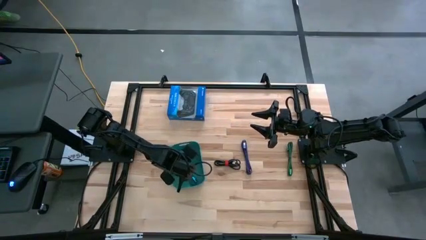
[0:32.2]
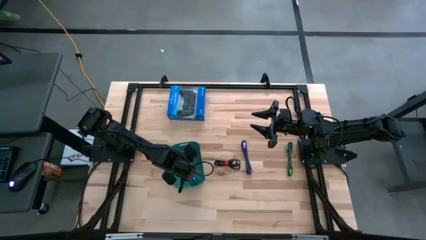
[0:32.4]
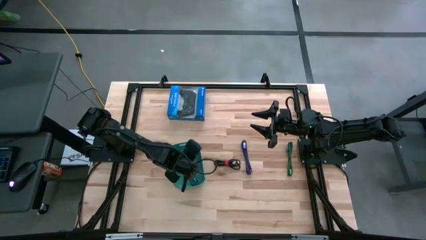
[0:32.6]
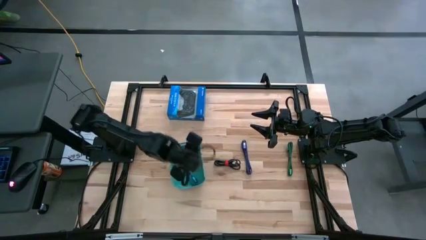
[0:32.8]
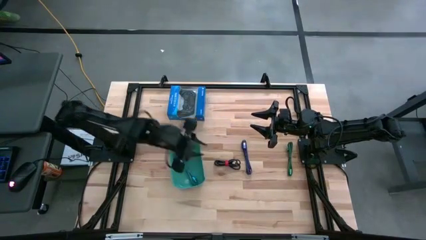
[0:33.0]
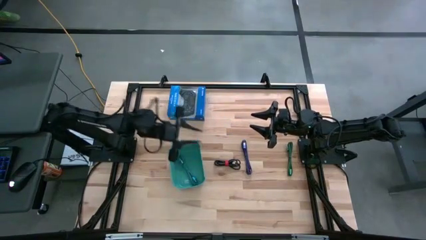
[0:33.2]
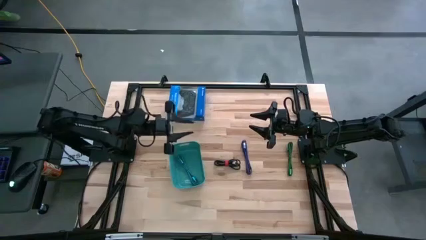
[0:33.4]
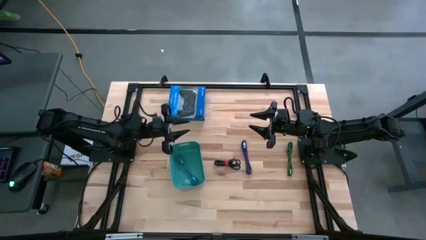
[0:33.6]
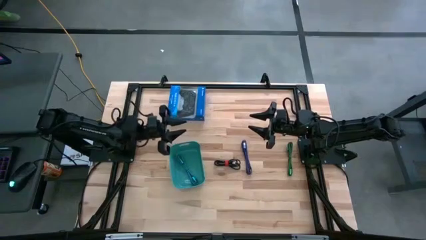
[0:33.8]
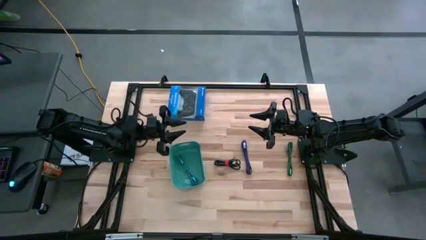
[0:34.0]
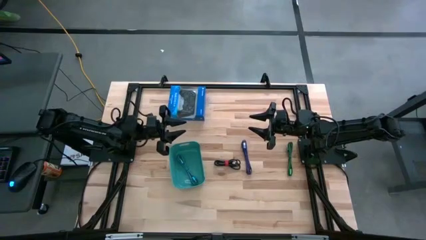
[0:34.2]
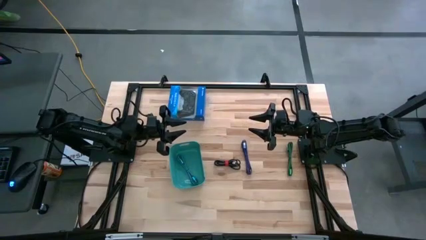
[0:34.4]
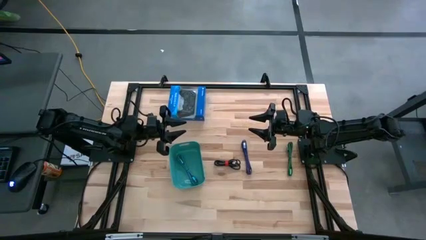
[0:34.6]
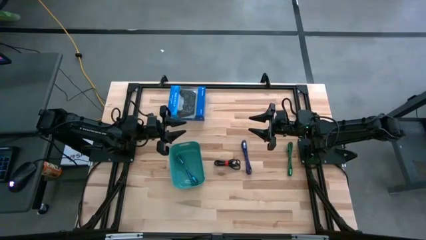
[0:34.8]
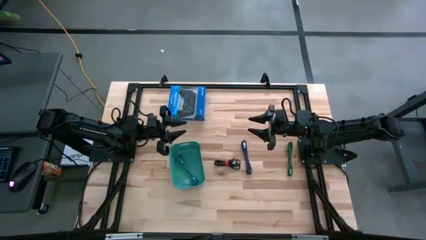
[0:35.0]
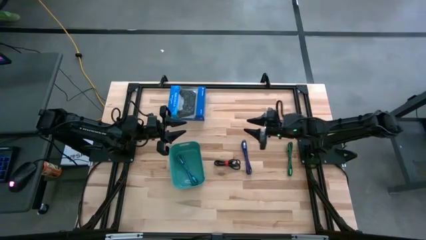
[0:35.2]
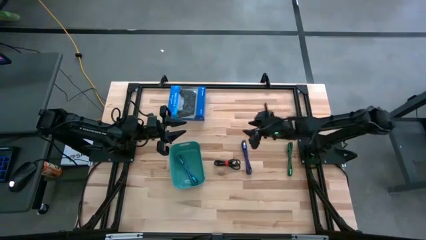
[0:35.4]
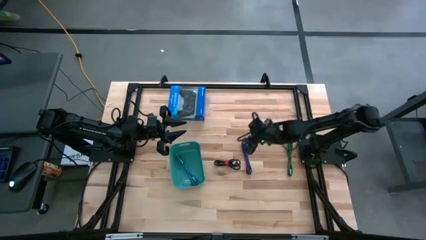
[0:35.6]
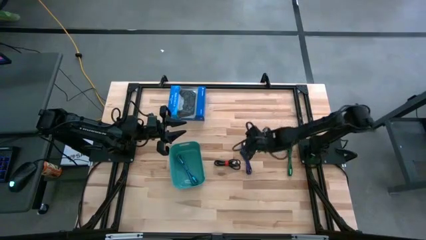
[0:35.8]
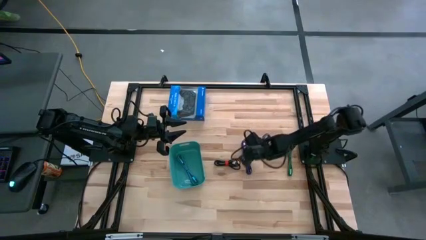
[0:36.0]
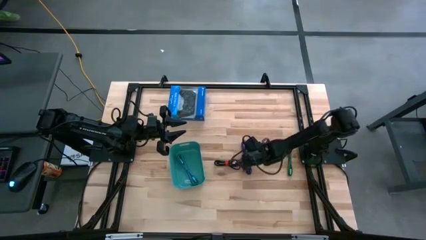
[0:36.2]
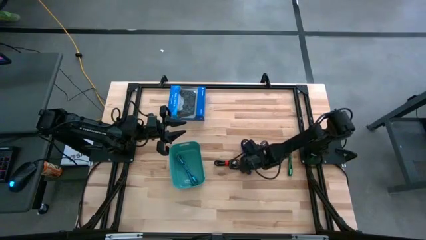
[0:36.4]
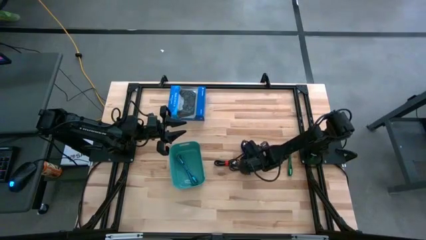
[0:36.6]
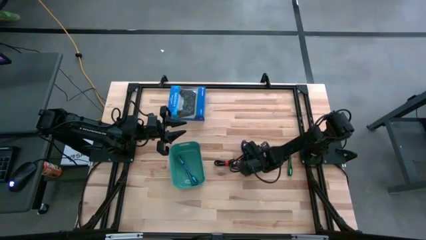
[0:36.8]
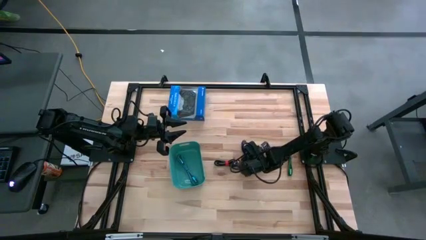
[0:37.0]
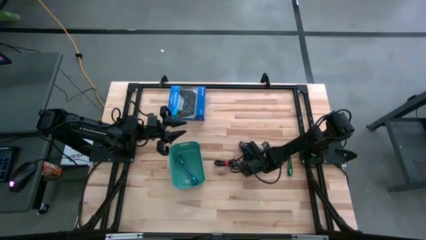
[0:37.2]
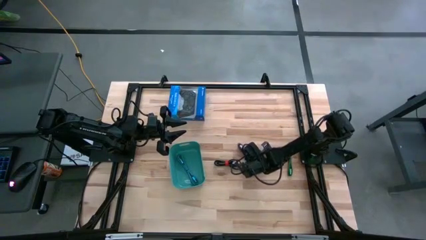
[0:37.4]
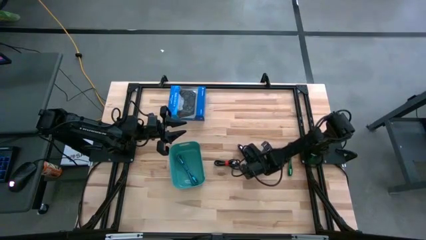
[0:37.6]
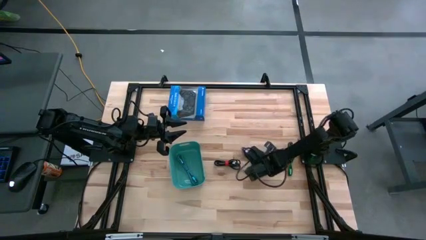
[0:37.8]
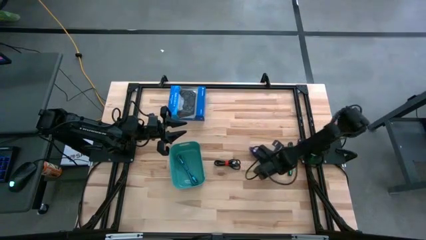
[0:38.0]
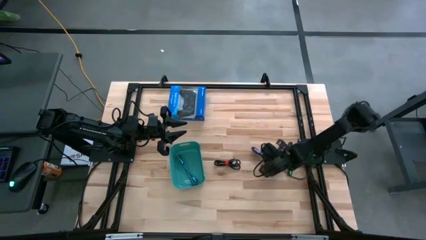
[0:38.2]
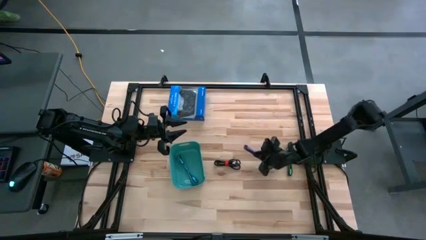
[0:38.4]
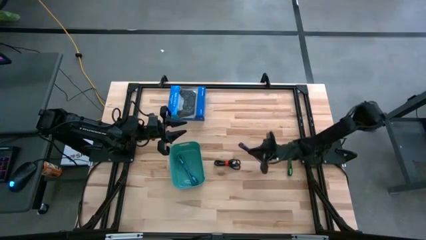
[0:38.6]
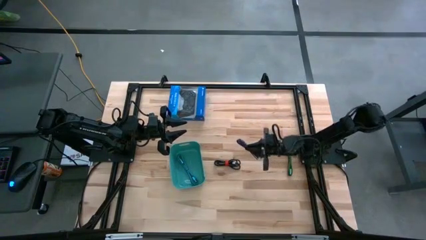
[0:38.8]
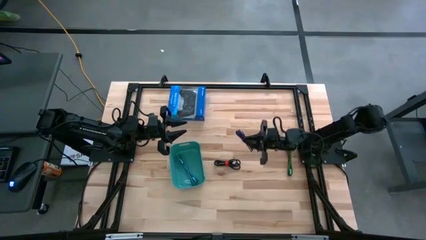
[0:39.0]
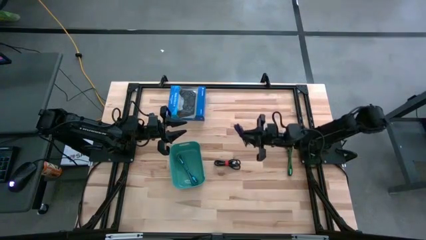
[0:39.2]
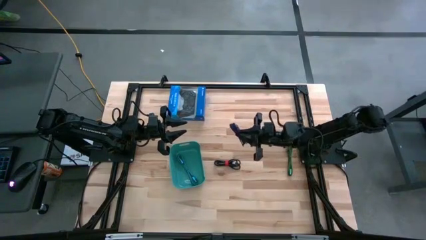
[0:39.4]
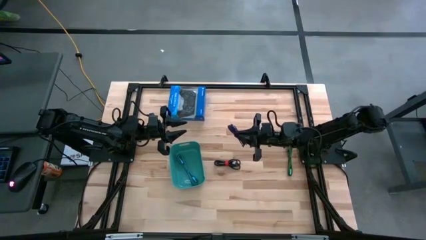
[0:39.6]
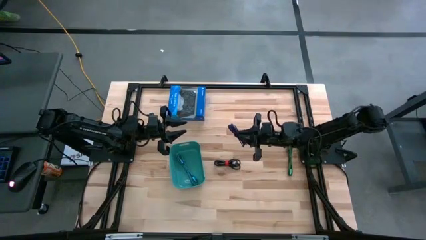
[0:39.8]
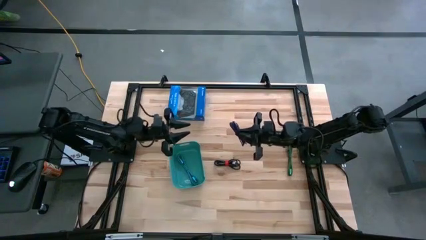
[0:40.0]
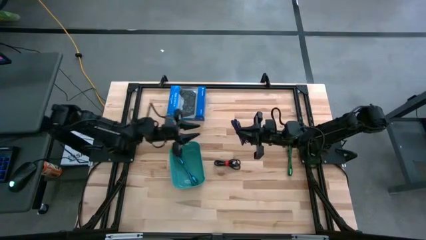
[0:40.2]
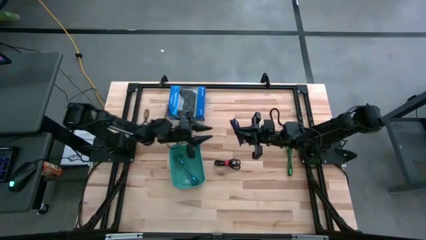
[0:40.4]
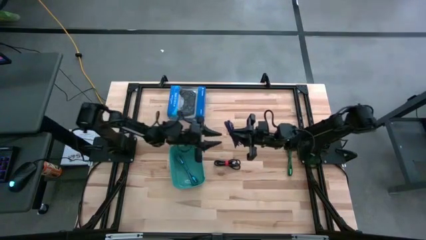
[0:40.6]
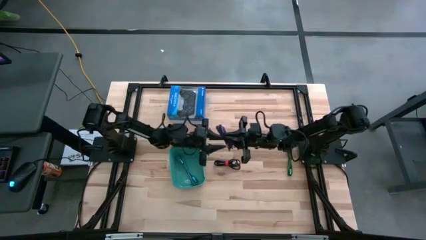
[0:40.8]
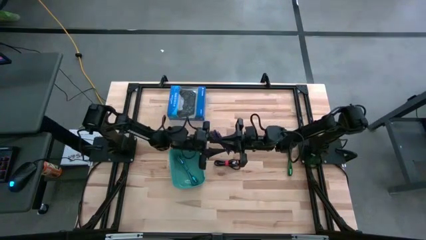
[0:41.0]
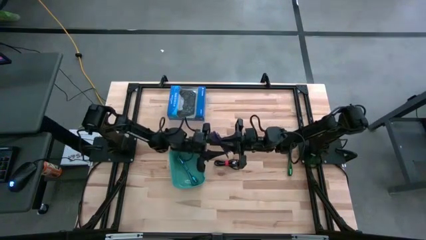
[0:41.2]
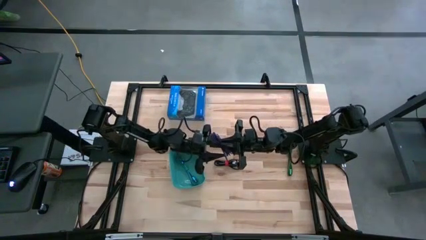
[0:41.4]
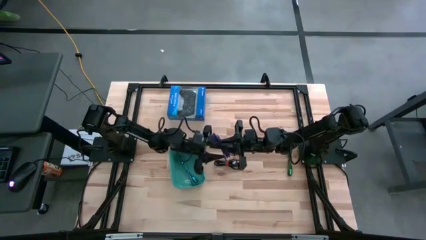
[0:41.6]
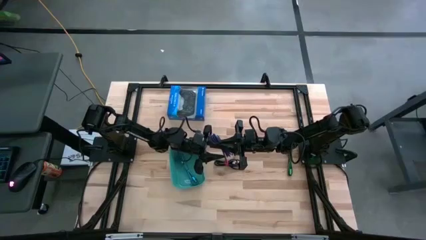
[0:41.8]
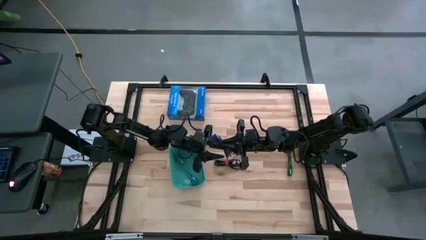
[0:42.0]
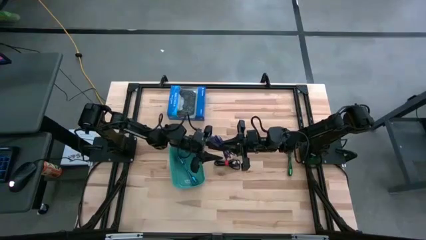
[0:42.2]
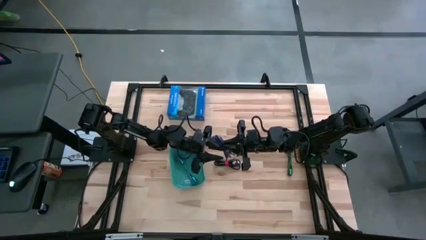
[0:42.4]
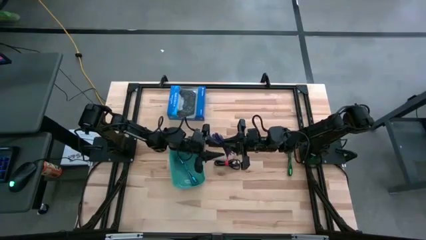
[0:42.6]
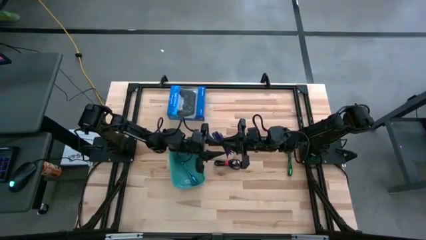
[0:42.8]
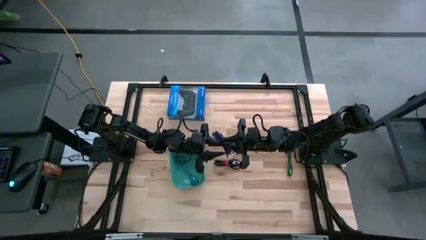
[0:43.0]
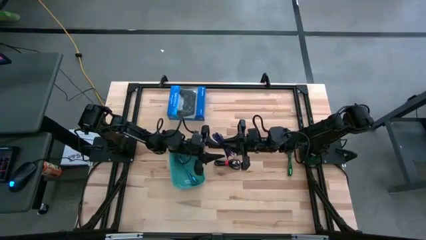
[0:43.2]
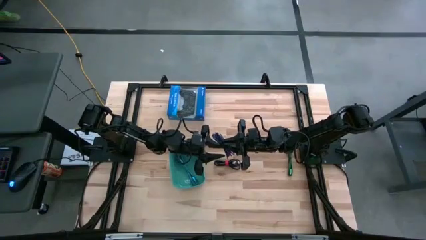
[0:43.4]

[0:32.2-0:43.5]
Task: Pick and place USB-C Cables
Put the violet charger cable into the green bin
